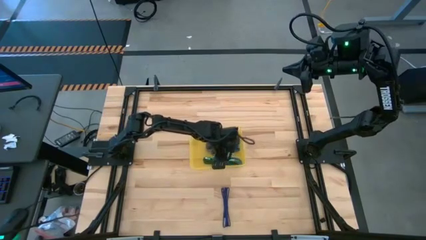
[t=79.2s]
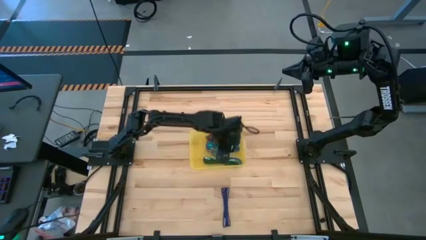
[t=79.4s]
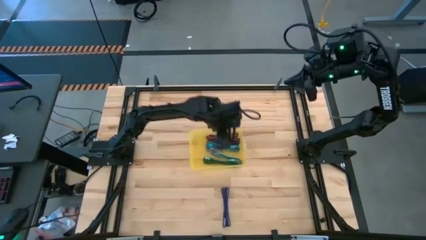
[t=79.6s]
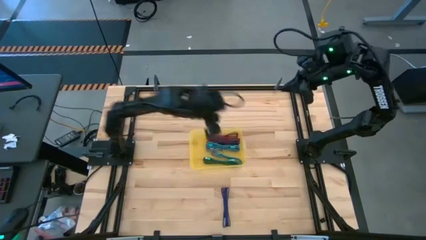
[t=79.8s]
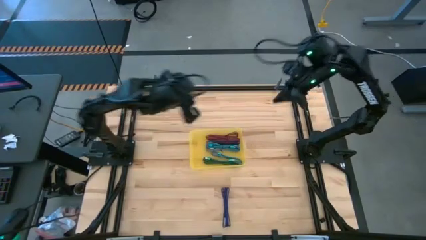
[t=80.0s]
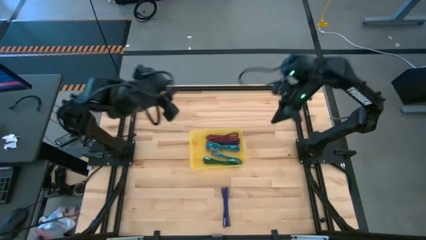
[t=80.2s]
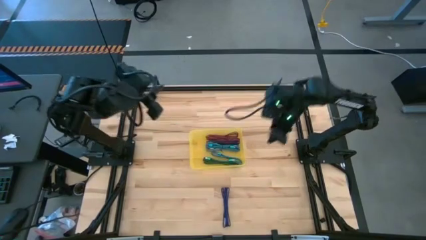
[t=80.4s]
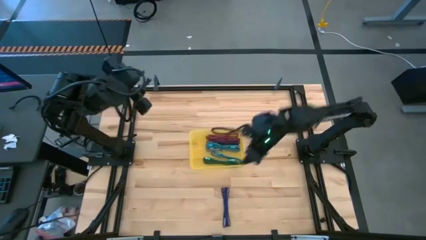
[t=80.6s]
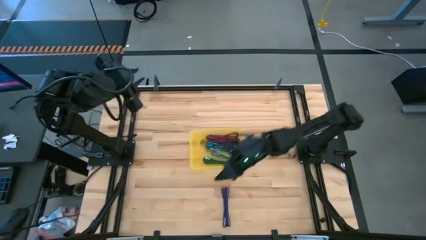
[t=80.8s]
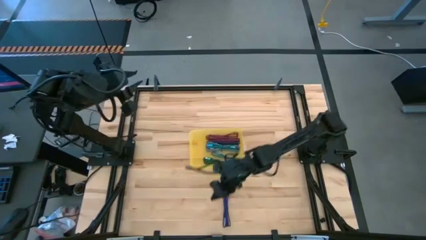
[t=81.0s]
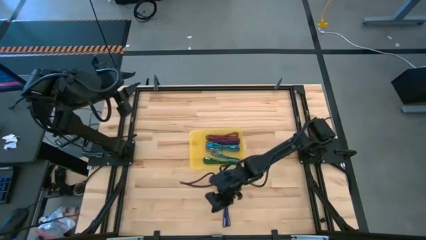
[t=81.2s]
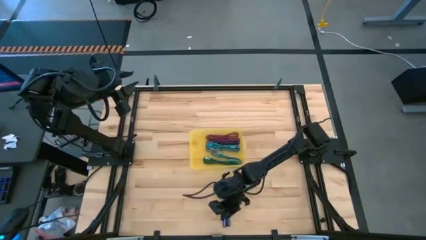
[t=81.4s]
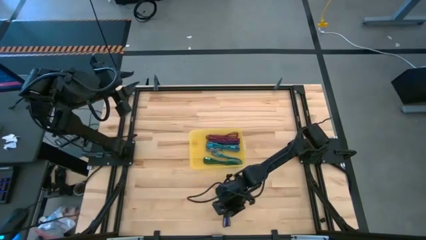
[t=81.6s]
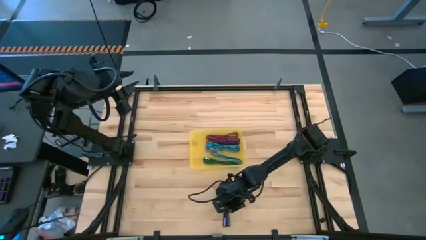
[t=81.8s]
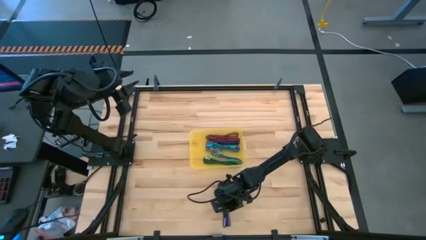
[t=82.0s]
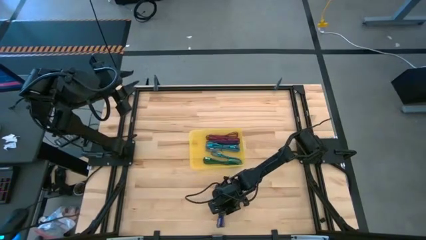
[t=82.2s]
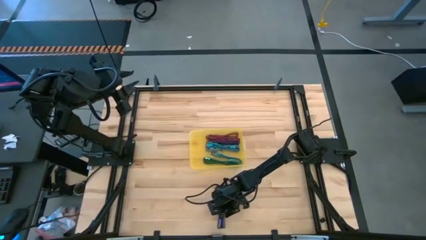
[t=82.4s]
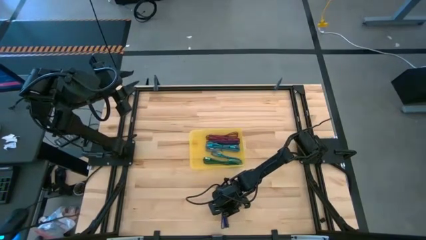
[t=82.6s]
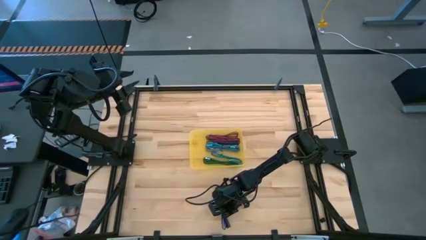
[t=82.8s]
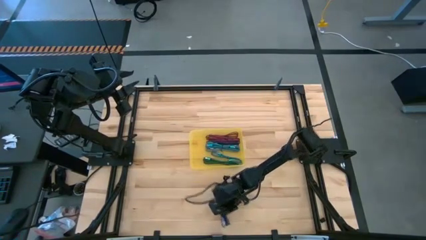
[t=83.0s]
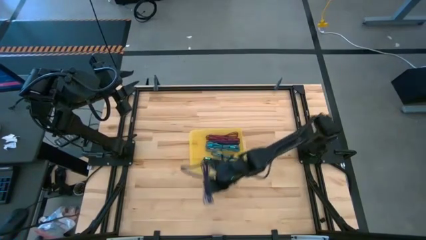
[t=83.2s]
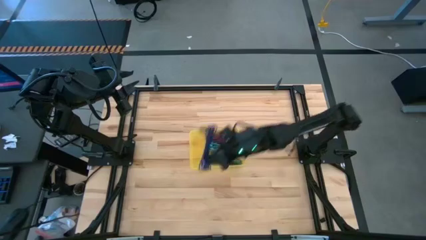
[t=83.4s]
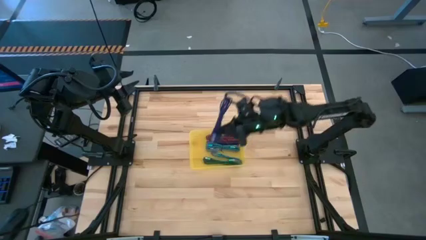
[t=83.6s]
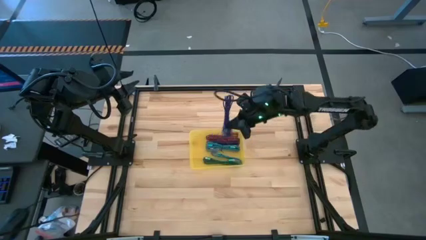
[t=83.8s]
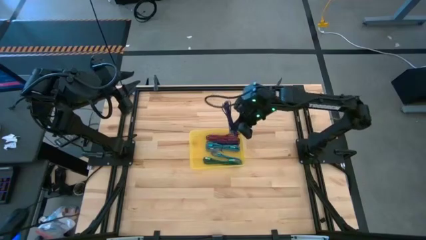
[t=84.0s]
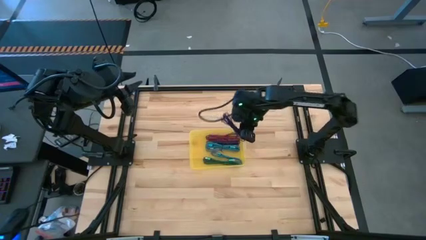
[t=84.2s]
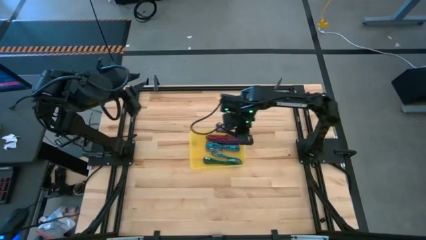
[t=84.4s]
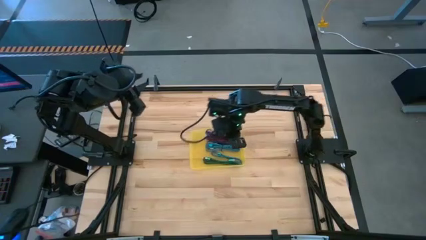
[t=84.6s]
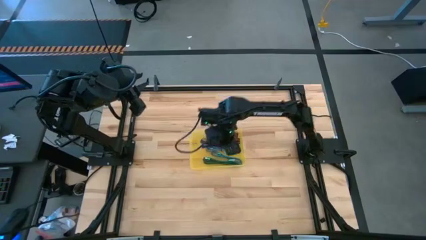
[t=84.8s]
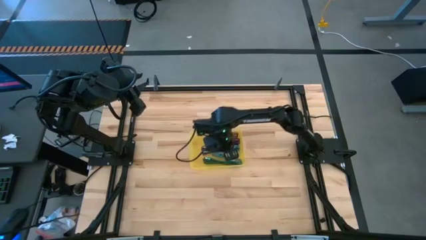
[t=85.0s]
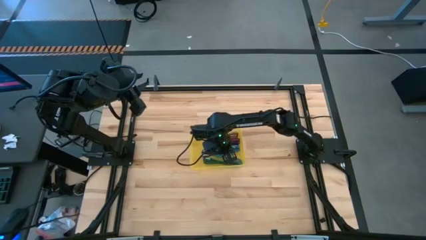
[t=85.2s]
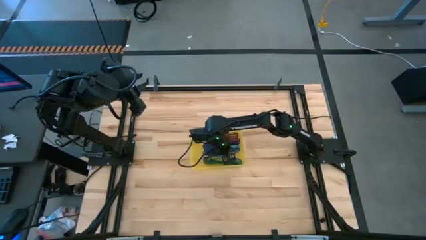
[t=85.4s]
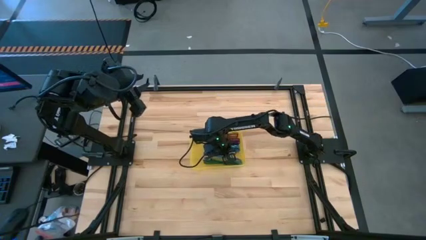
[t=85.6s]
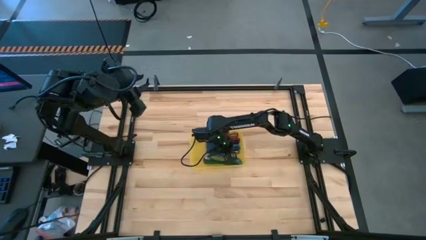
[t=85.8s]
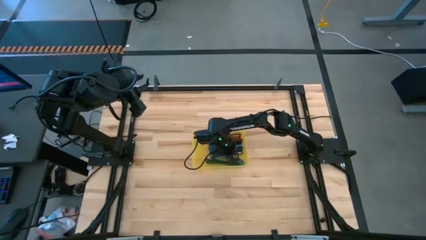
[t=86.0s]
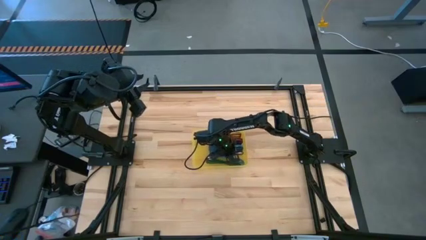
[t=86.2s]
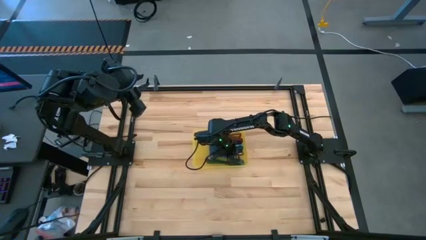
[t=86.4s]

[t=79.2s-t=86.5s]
Task: Pick and place USB-C Cables
Put the purple charger cable into the yellow bin

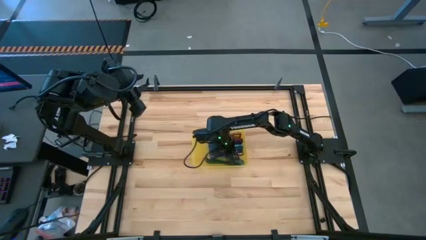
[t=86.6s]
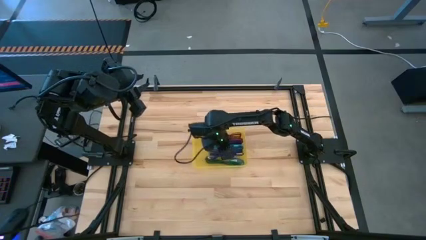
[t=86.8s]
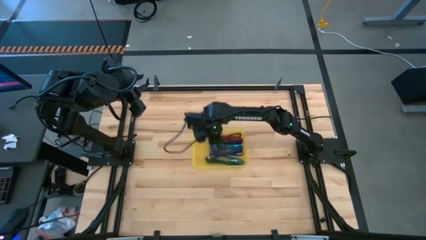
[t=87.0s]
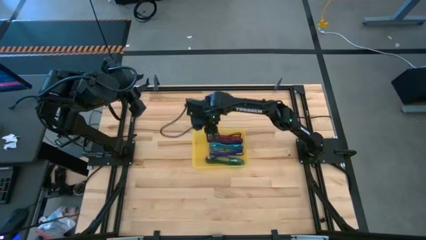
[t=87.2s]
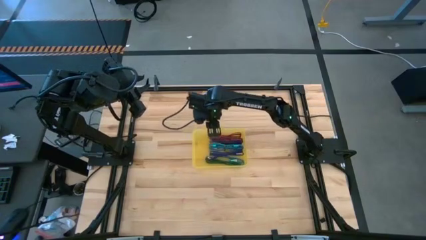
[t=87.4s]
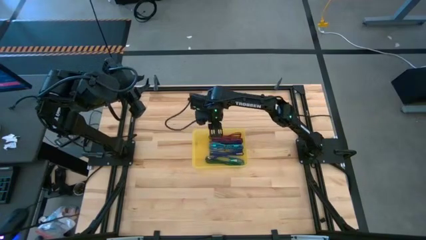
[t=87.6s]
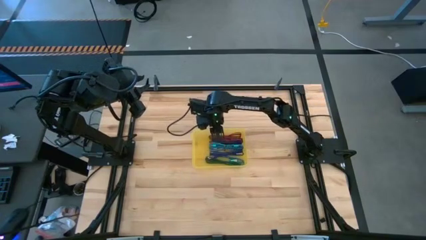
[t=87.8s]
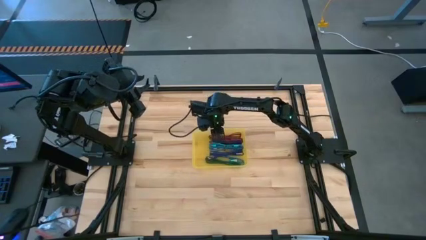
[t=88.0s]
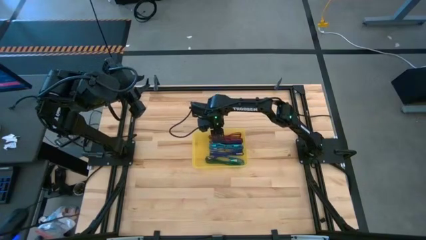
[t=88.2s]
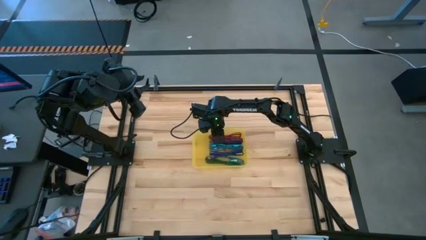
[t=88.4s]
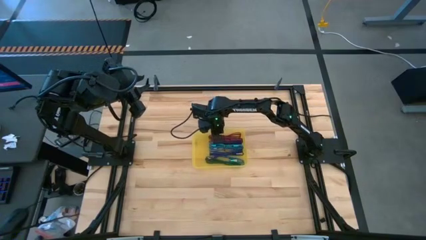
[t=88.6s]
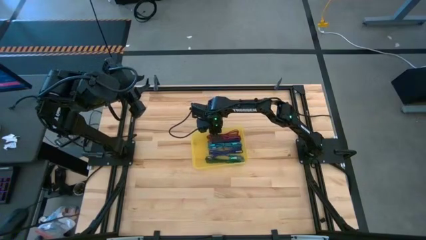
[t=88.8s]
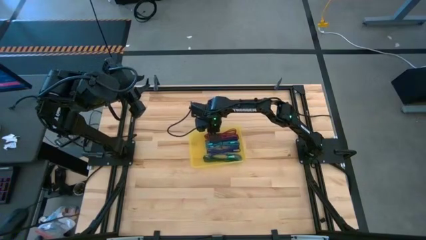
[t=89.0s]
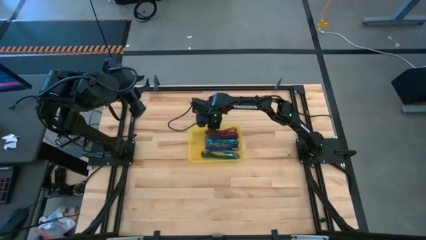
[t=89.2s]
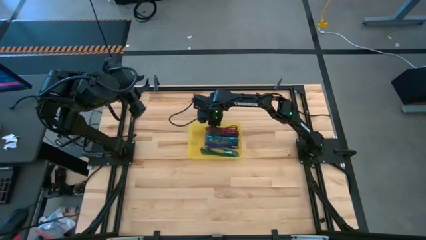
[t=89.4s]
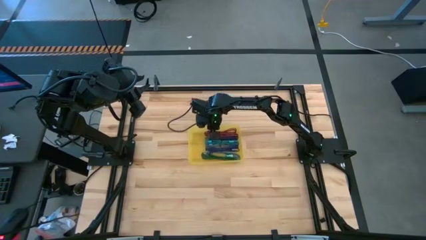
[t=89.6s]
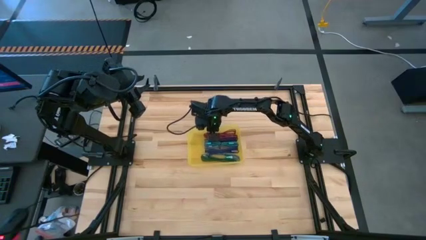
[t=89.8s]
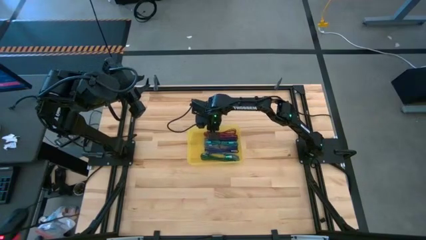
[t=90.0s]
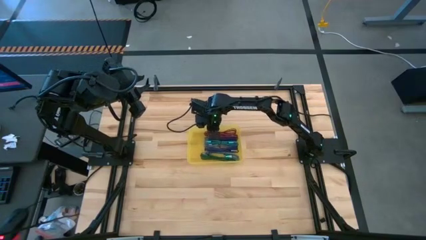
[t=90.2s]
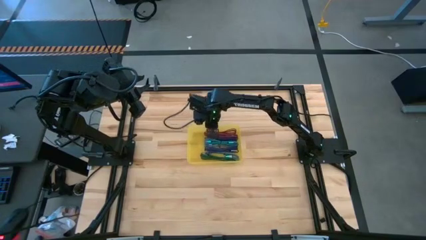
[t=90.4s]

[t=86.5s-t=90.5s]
Adjust the yellow bin

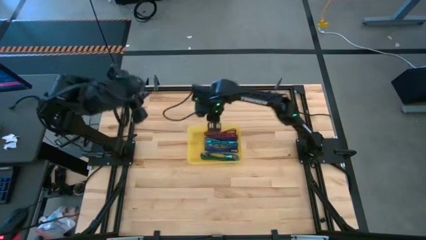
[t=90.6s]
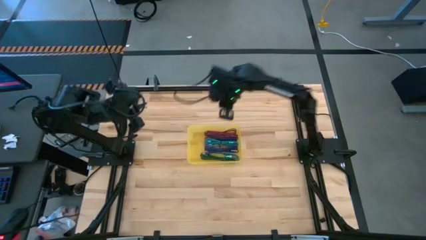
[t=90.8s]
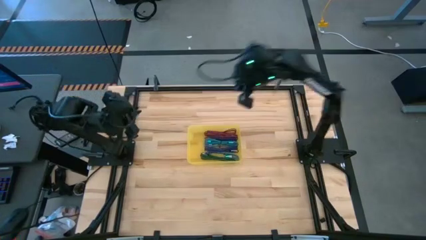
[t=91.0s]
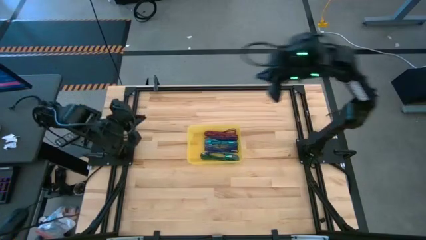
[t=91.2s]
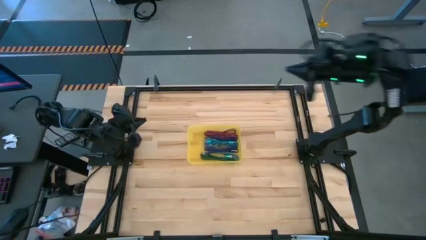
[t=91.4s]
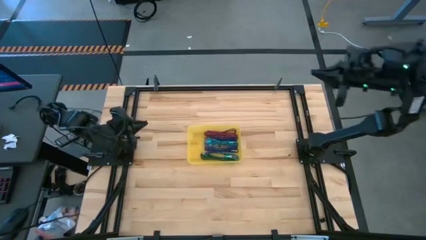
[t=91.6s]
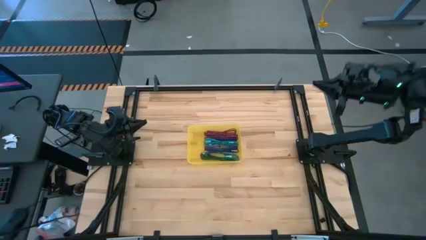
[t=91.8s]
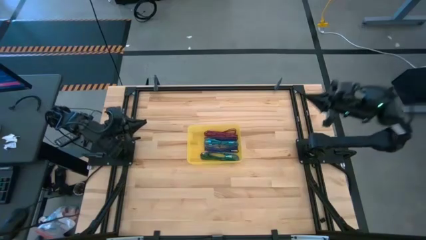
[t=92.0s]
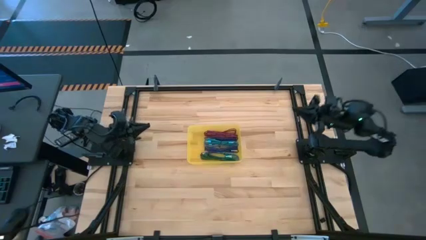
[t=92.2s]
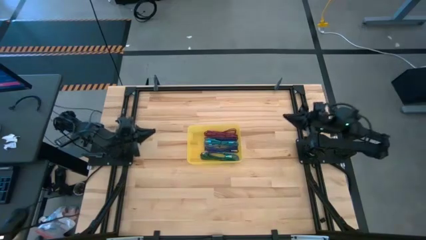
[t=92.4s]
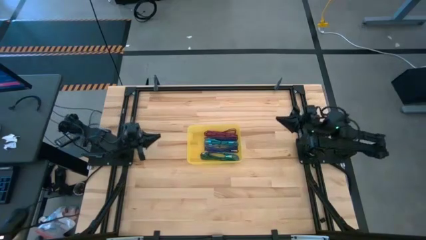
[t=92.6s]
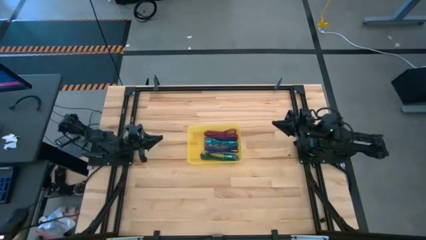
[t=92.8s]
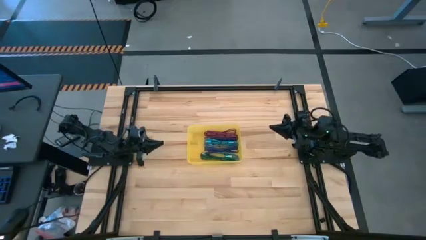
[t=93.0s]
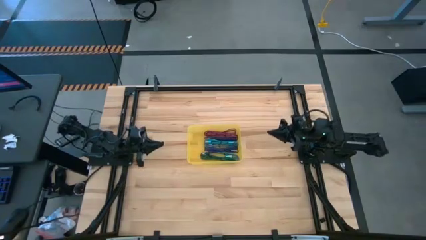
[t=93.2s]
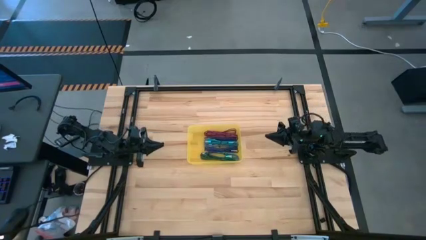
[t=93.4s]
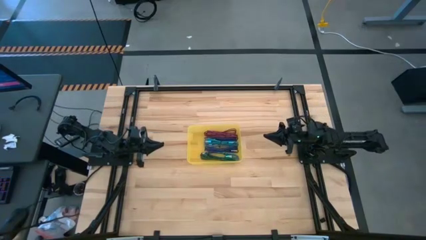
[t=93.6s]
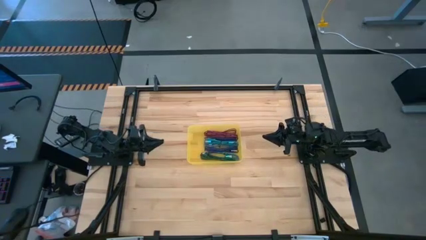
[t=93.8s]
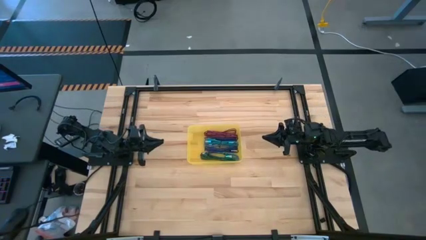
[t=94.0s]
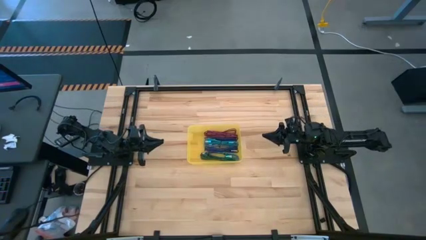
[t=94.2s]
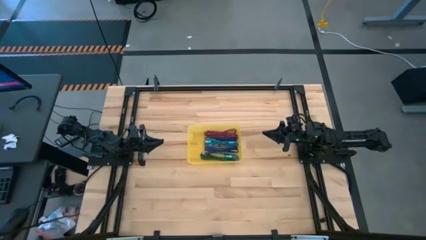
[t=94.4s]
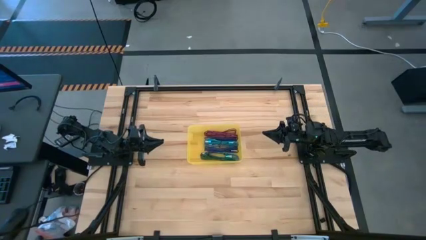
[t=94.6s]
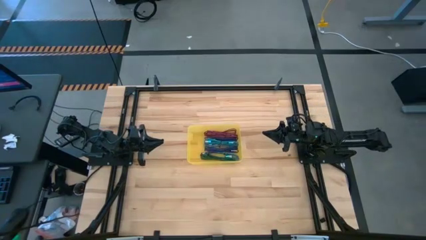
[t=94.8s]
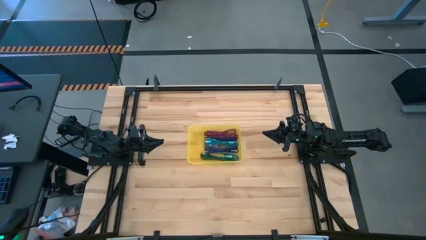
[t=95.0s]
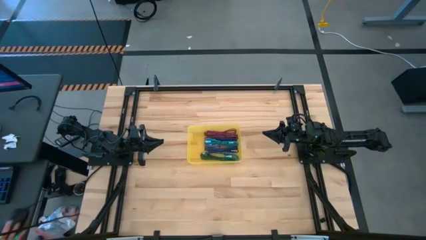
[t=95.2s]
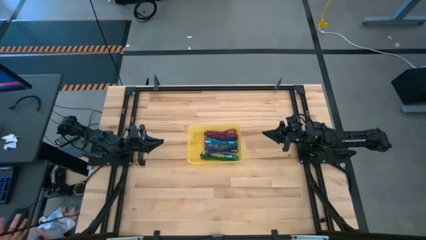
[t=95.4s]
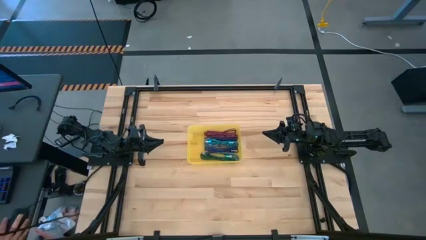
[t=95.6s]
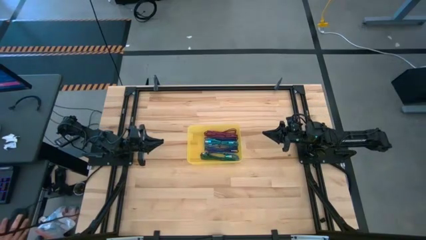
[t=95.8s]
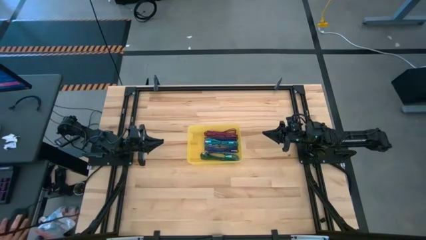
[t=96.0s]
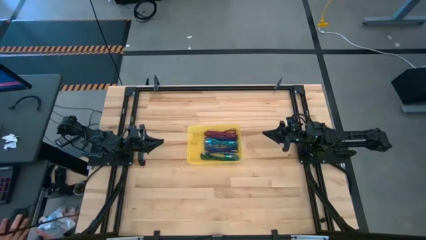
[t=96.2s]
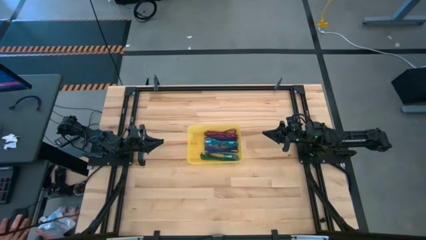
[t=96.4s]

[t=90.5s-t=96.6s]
Return to Home Position
